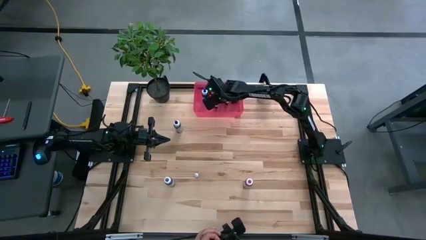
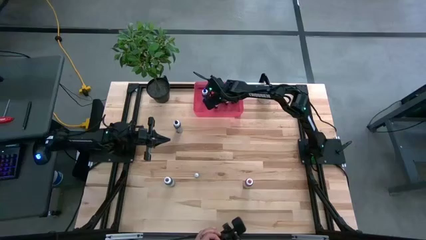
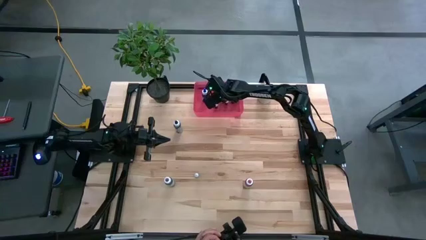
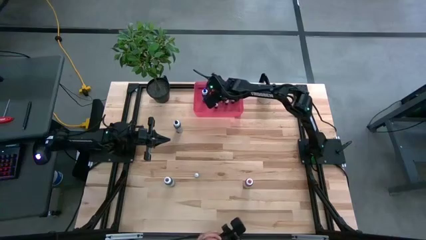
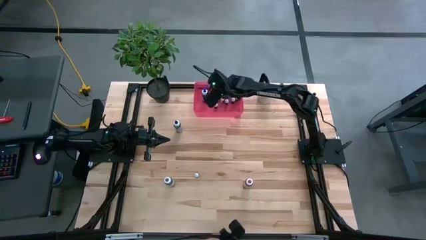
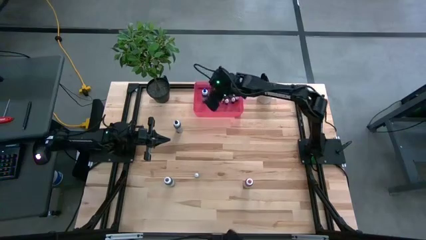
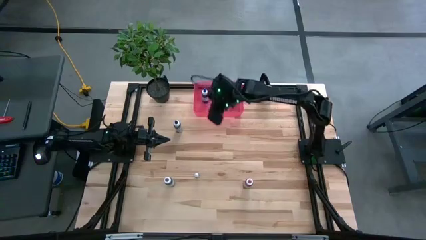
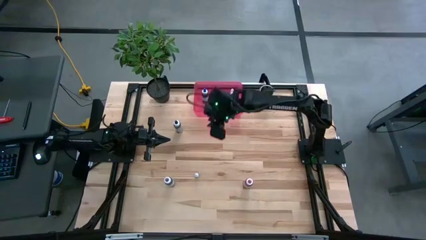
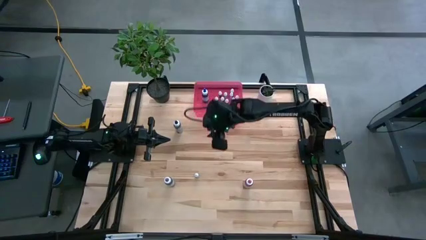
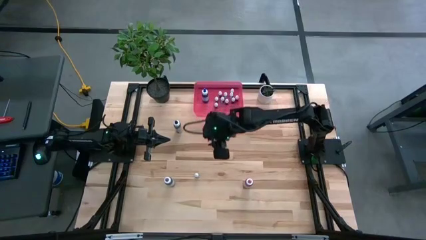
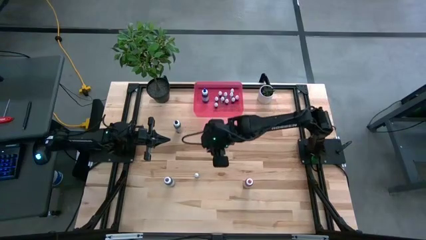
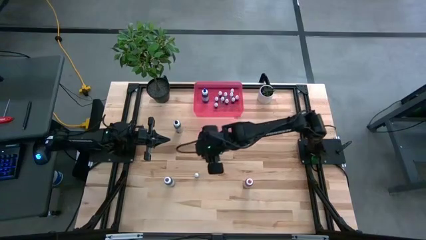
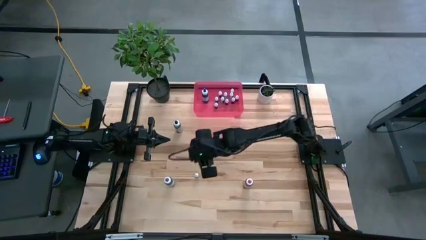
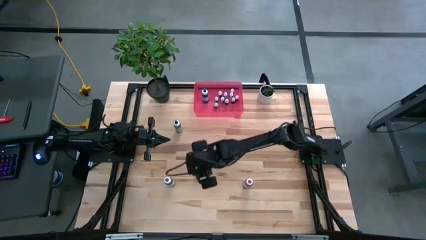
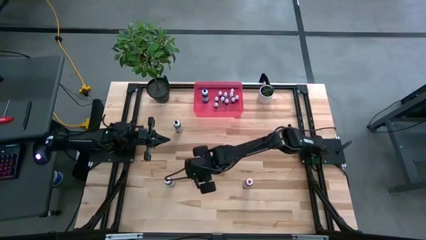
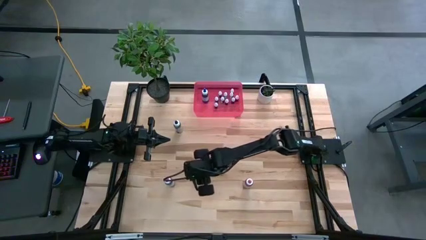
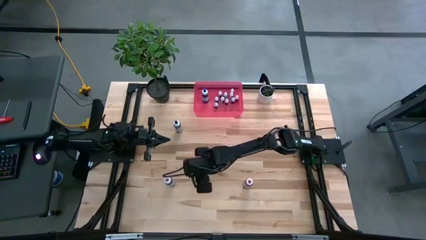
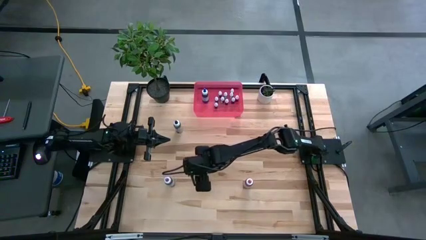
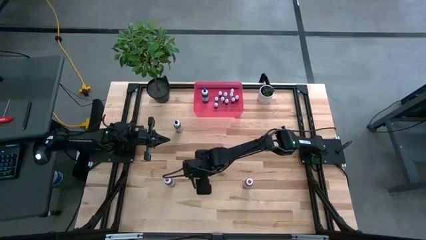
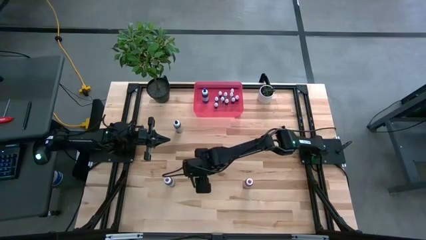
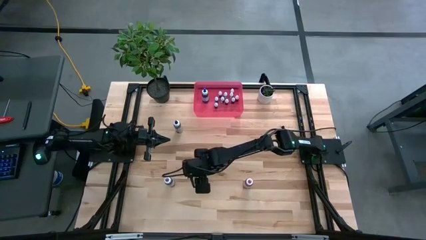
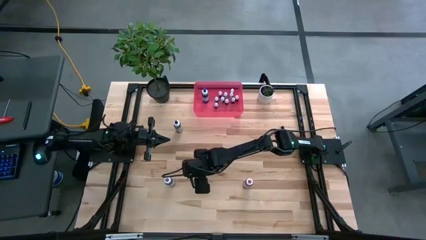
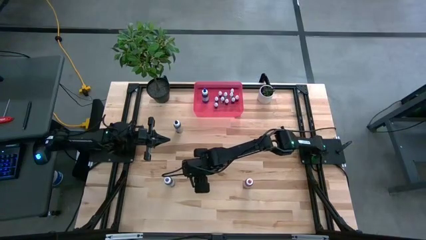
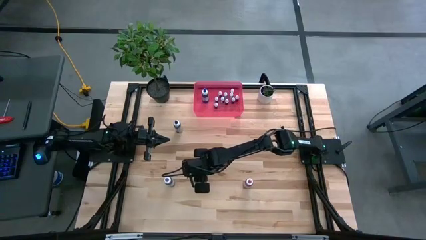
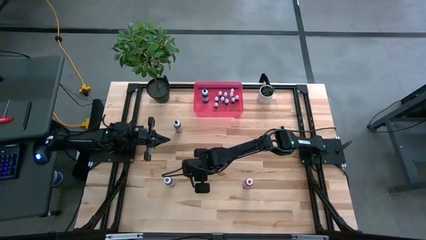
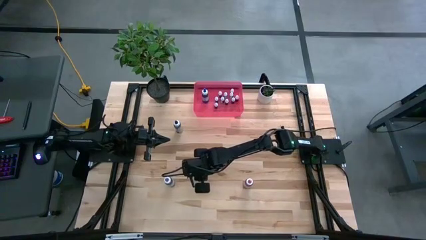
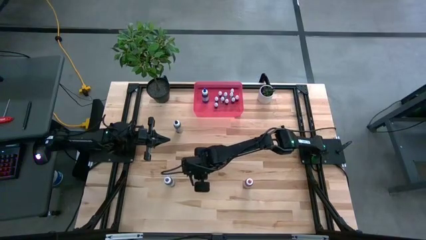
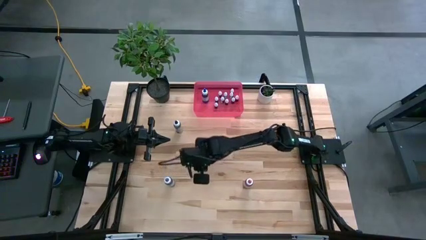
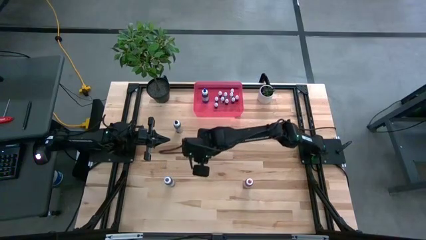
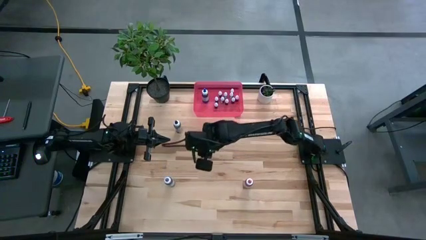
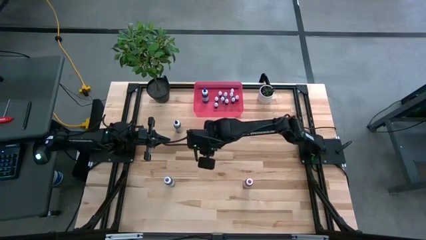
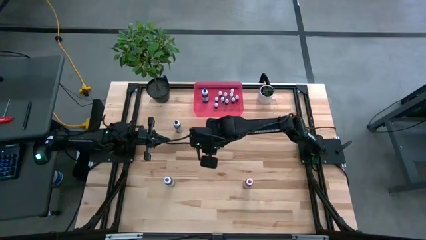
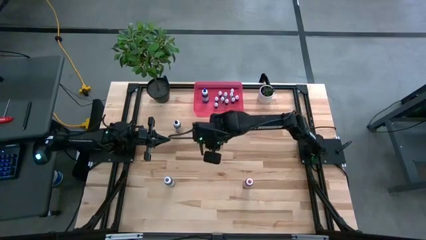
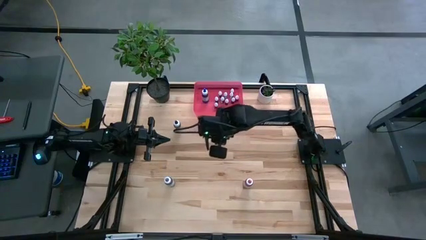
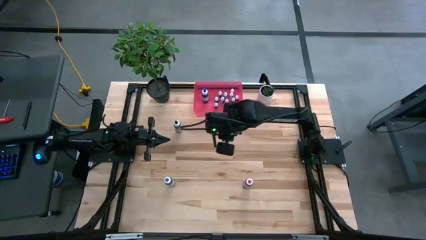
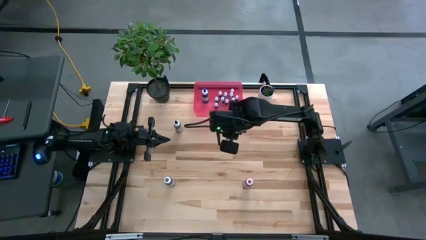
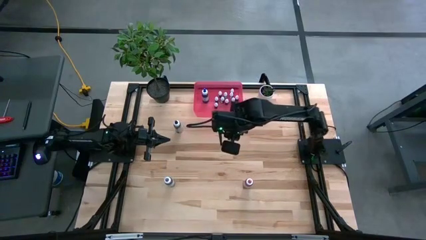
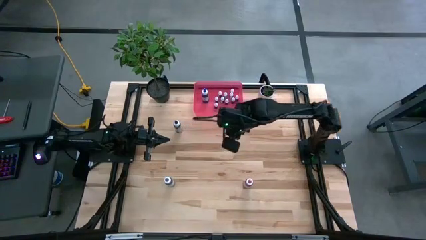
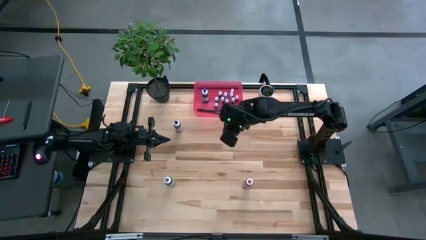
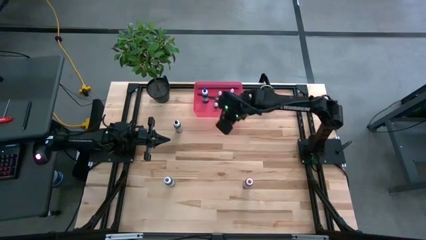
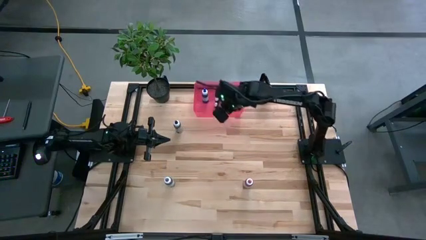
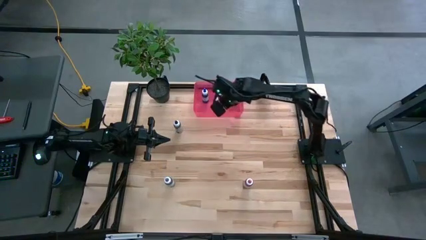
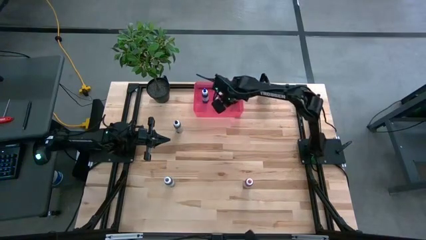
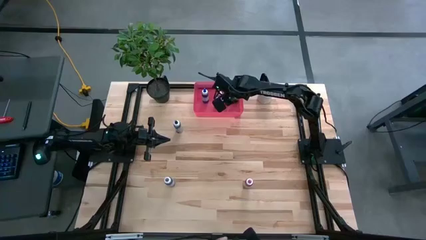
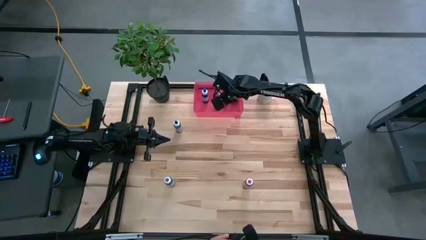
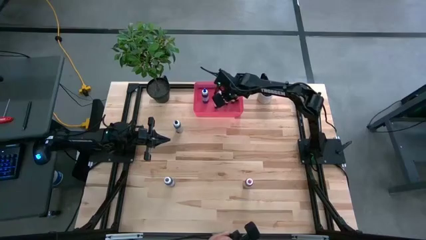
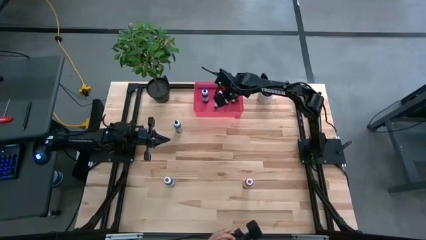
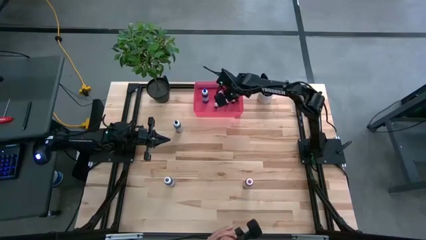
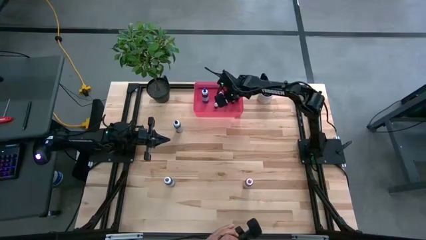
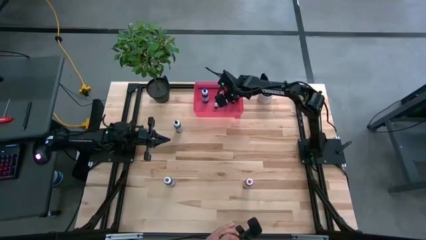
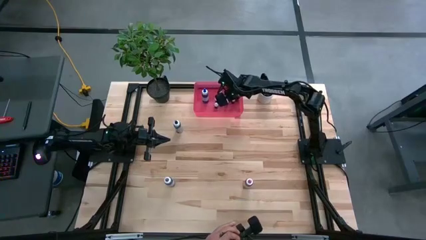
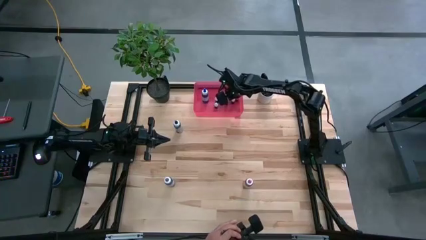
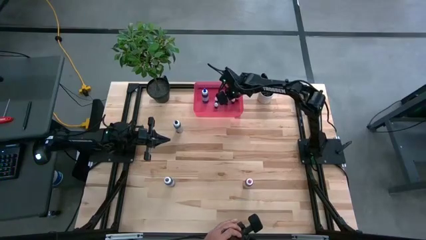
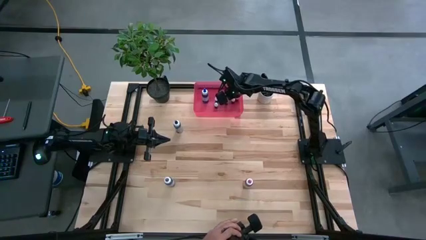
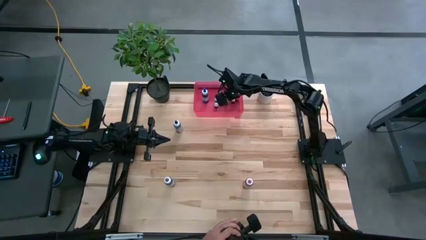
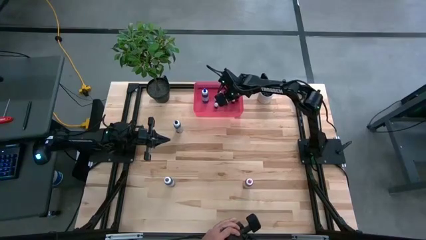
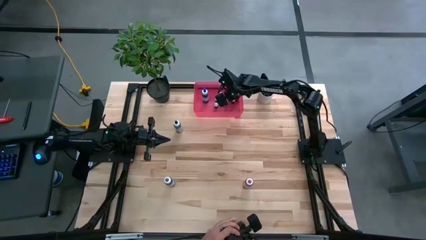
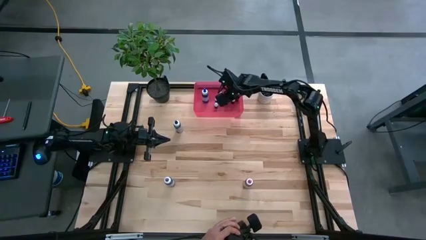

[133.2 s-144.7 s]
Task: Pick & Place food coloring
Put the small green food coloring bottle into the red bin

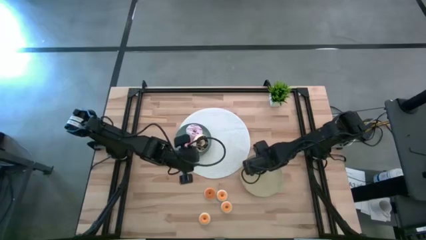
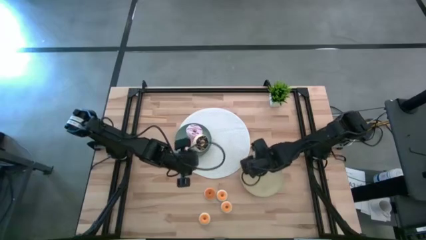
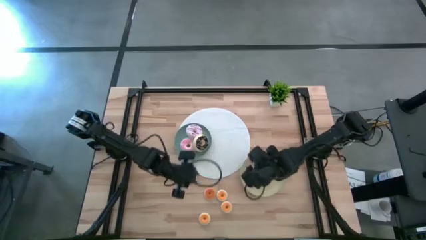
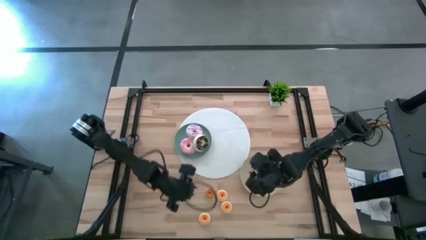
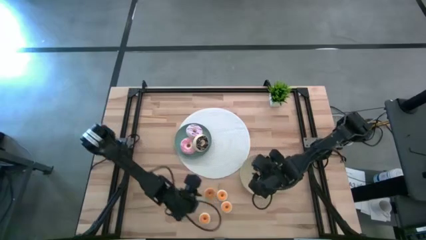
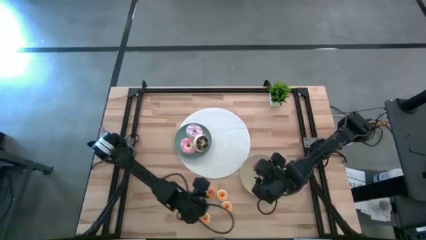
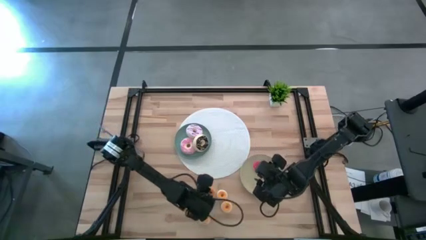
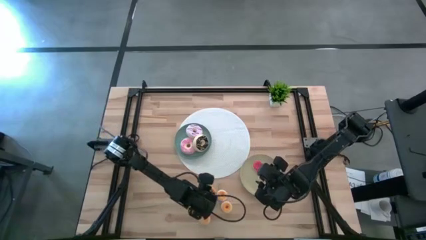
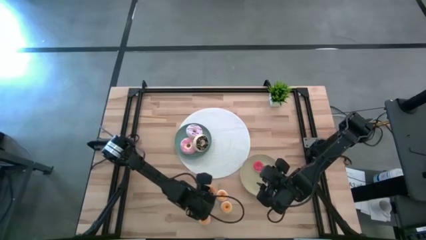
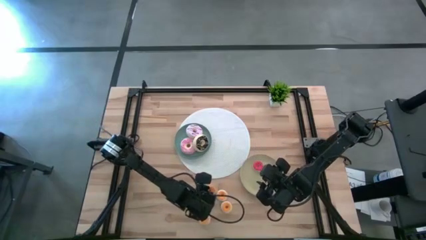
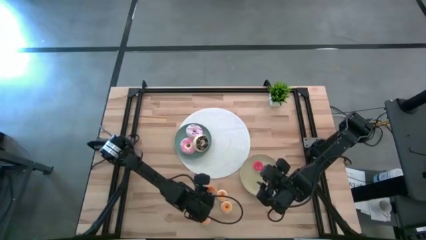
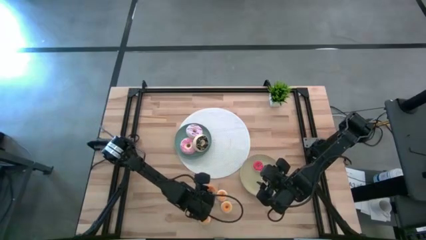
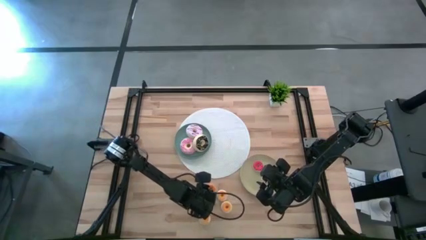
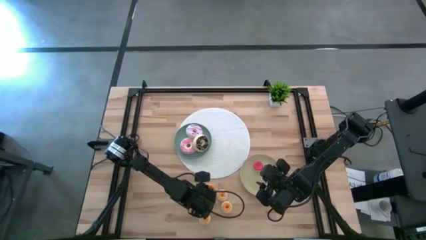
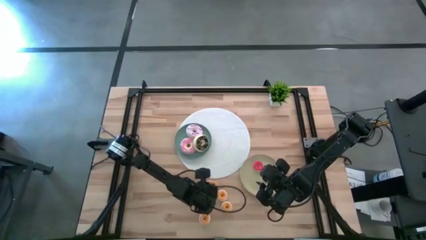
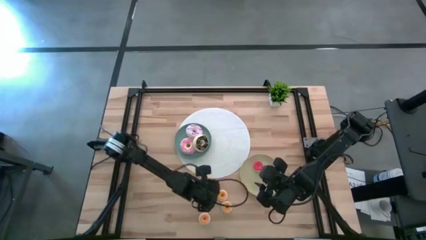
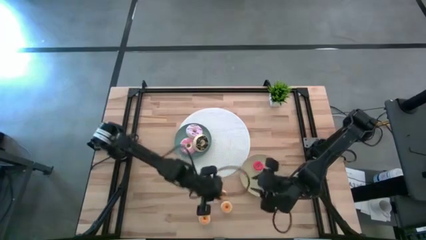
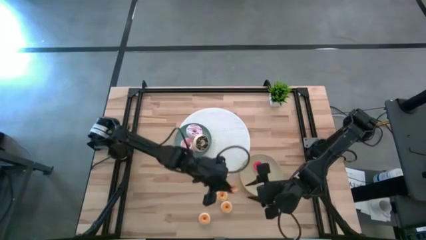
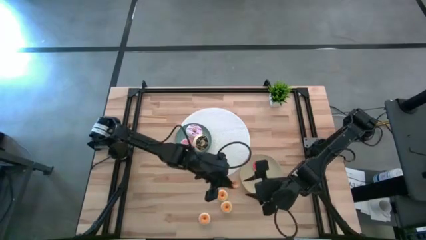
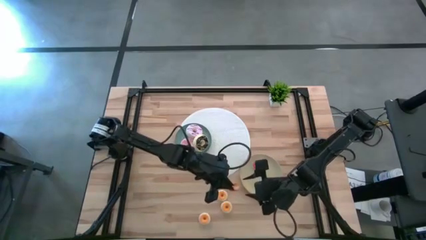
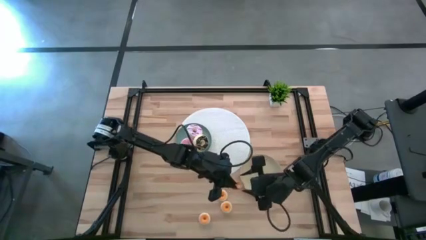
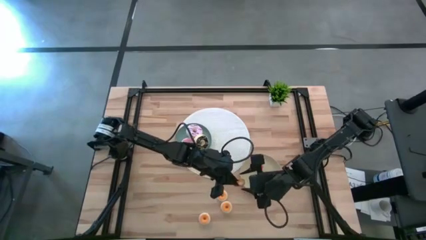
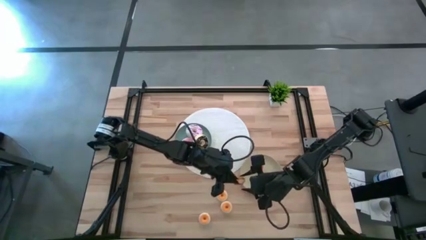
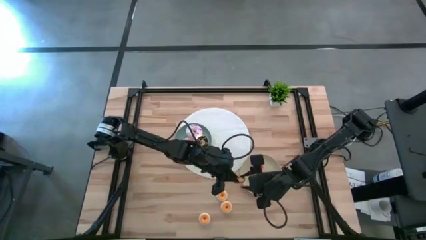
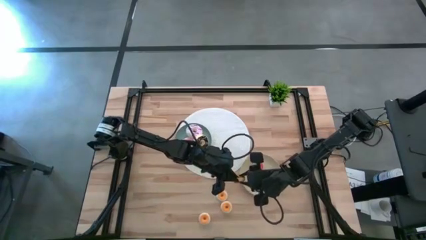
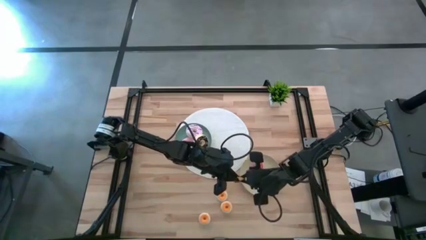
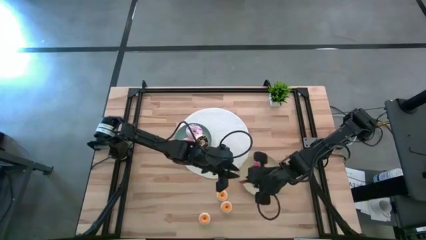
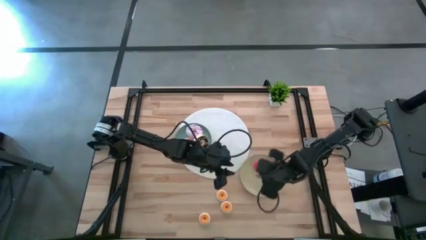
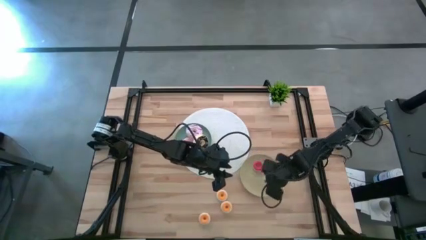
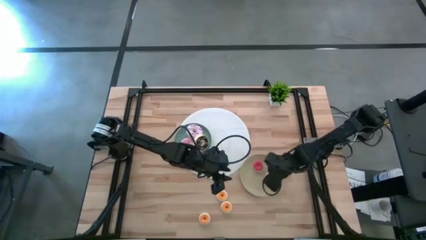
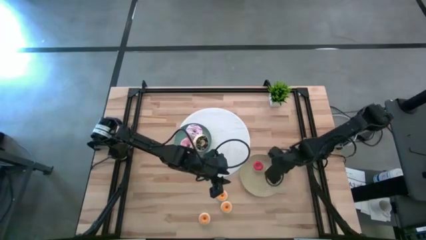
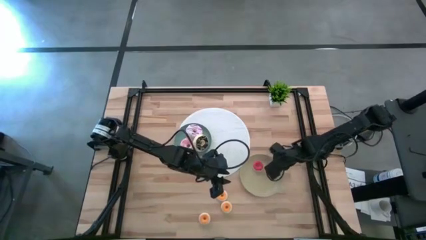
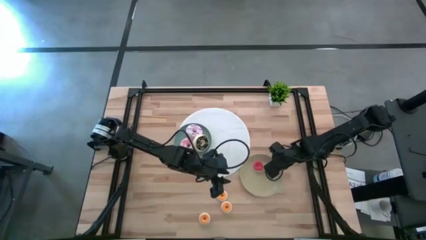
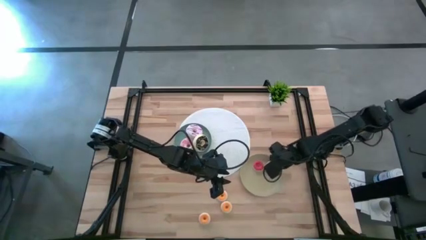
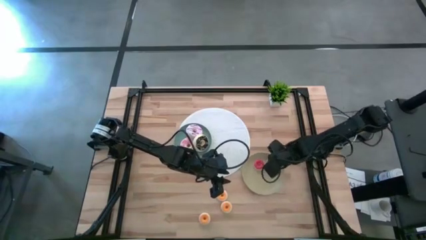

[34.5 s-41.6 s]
Task: Pick & Place donuts
Put the small orange donut on the brown plate
